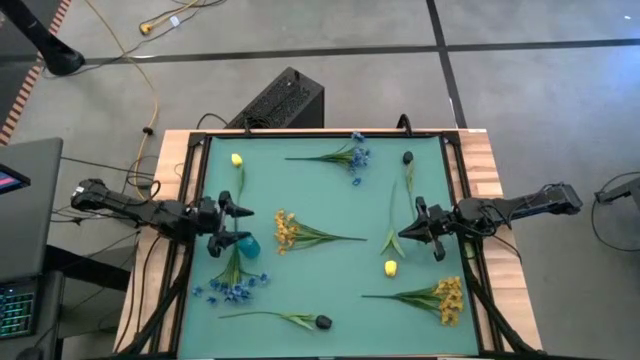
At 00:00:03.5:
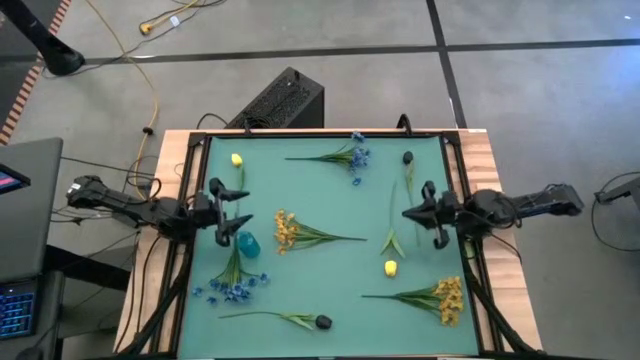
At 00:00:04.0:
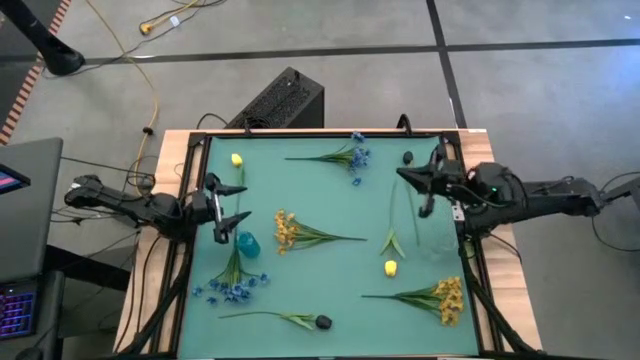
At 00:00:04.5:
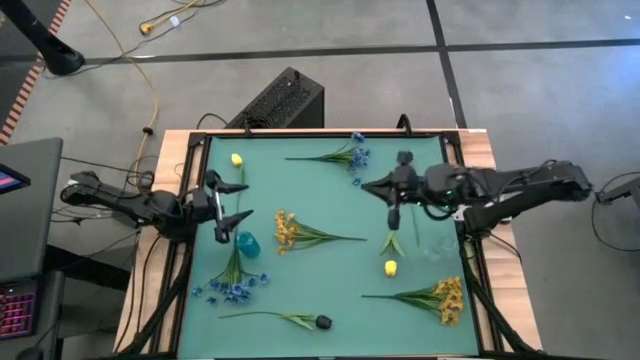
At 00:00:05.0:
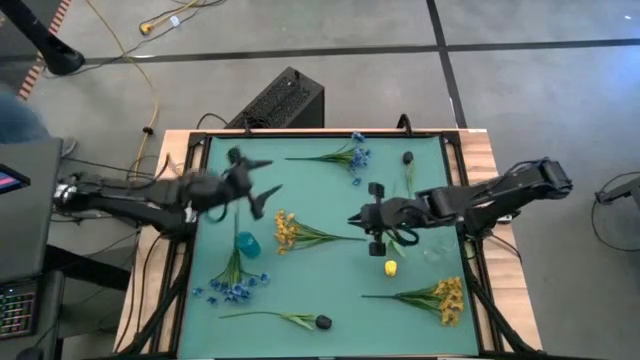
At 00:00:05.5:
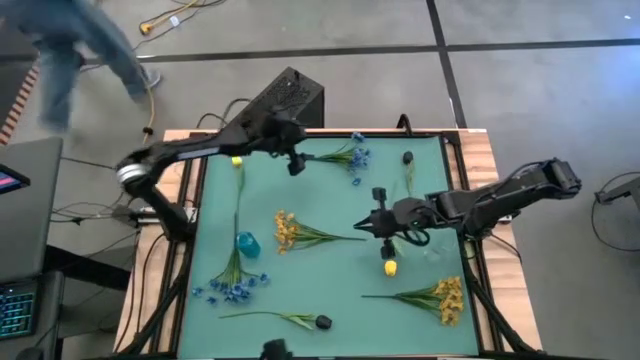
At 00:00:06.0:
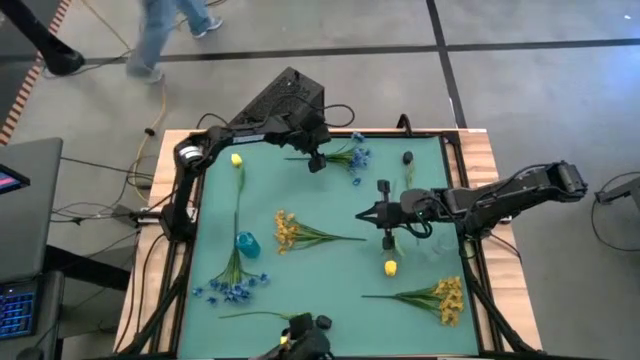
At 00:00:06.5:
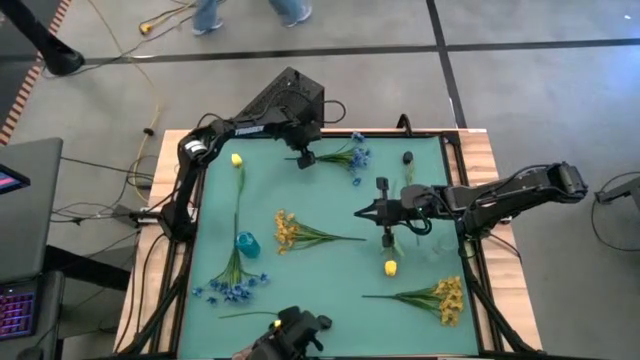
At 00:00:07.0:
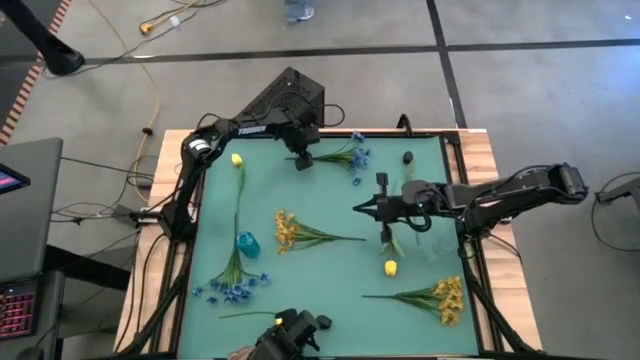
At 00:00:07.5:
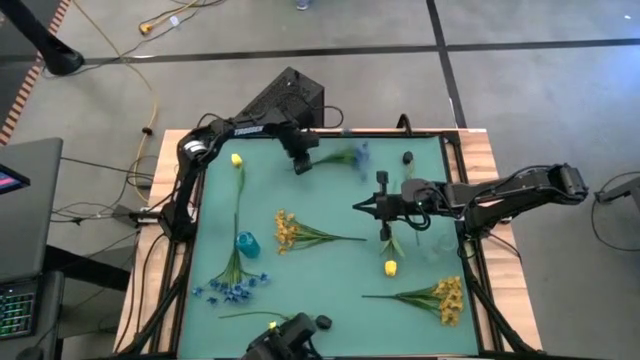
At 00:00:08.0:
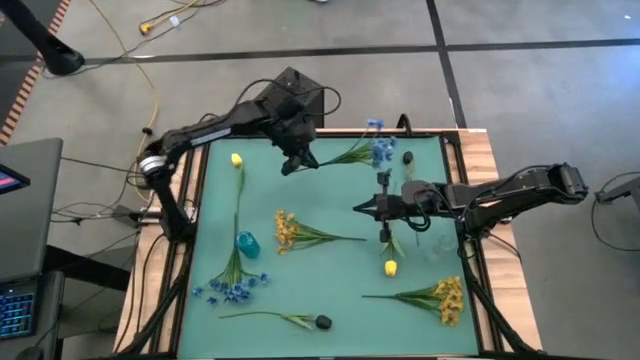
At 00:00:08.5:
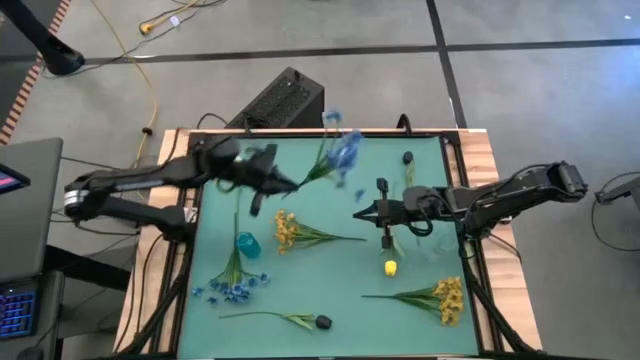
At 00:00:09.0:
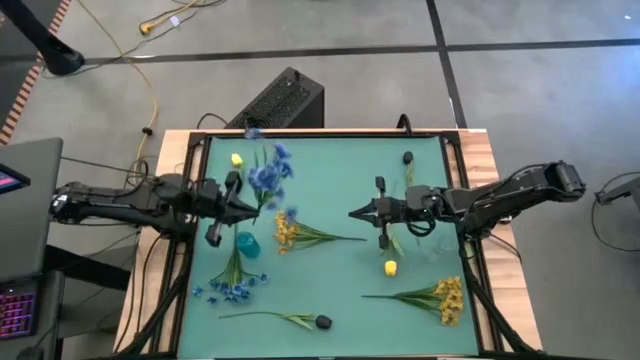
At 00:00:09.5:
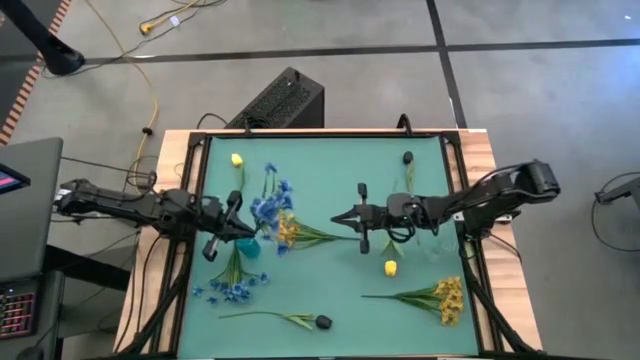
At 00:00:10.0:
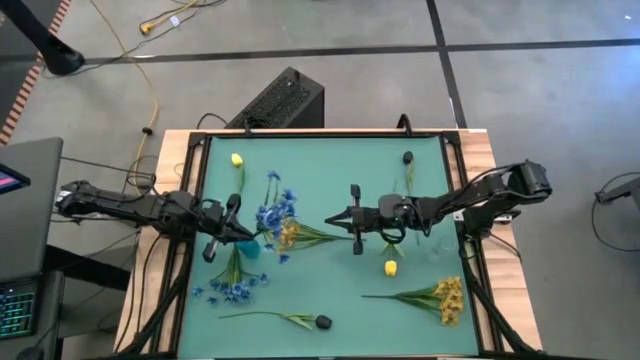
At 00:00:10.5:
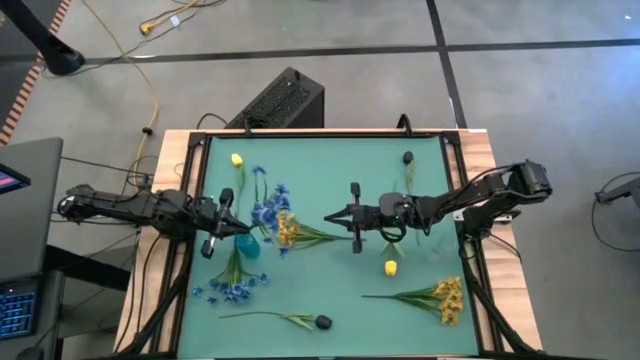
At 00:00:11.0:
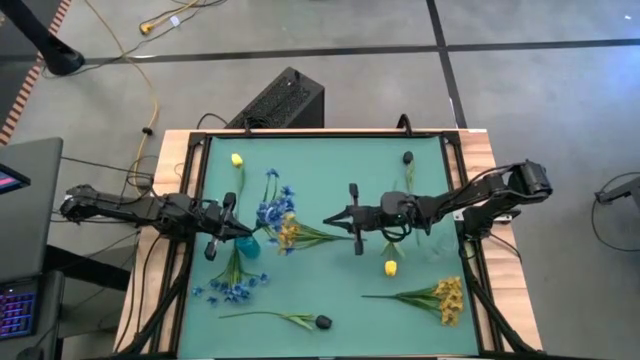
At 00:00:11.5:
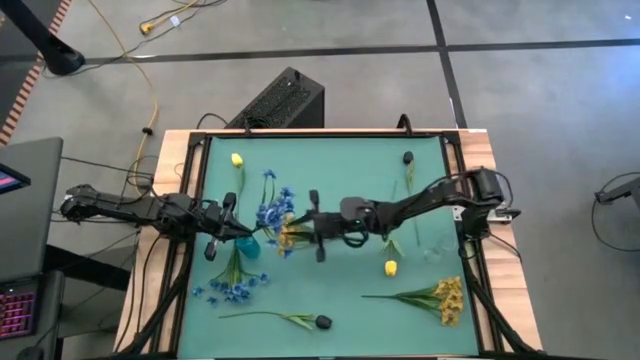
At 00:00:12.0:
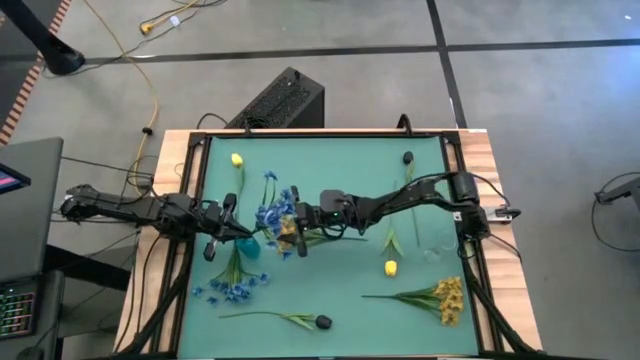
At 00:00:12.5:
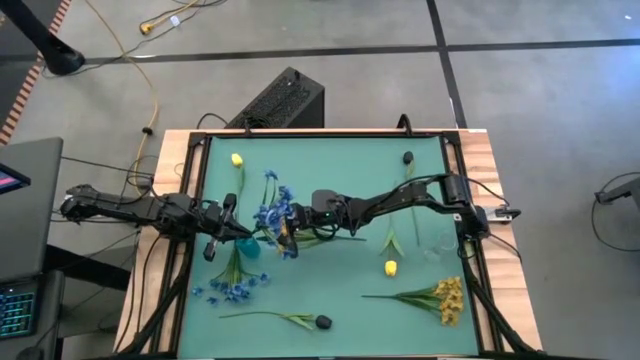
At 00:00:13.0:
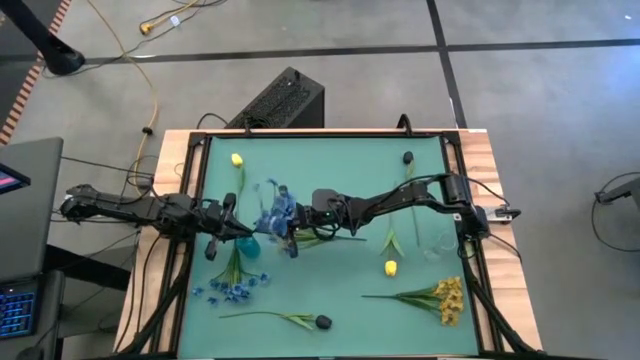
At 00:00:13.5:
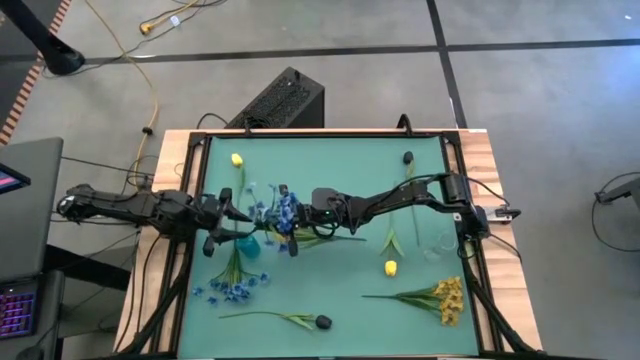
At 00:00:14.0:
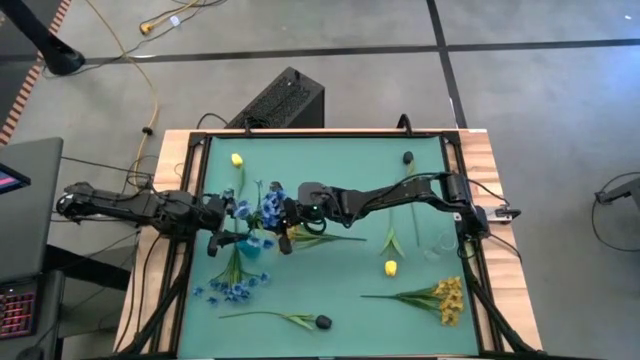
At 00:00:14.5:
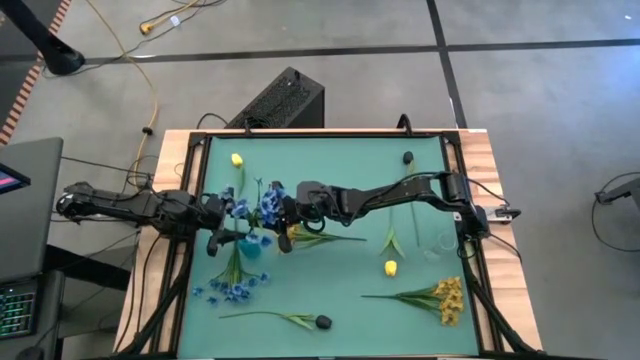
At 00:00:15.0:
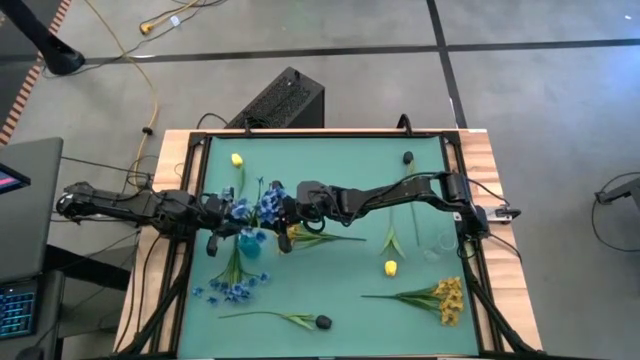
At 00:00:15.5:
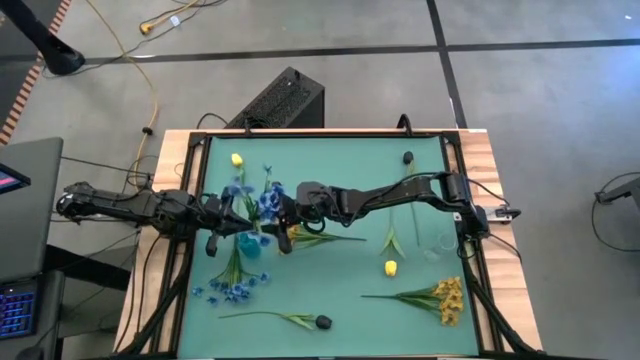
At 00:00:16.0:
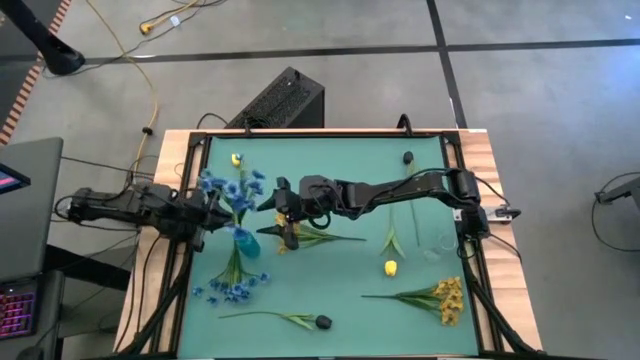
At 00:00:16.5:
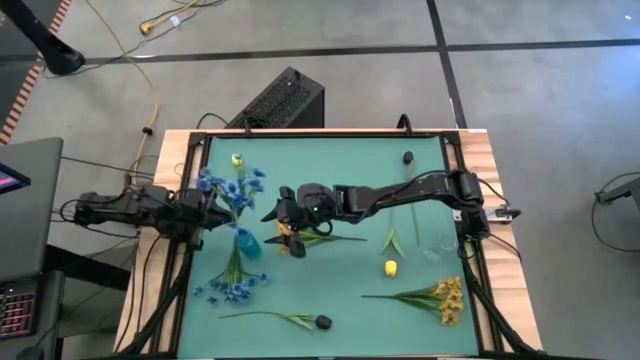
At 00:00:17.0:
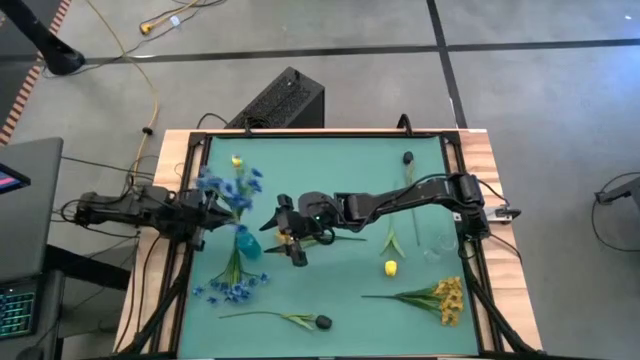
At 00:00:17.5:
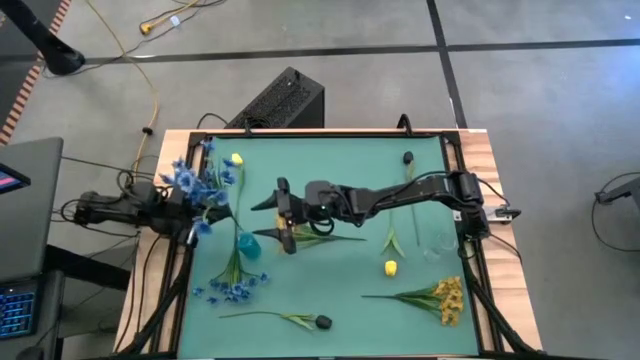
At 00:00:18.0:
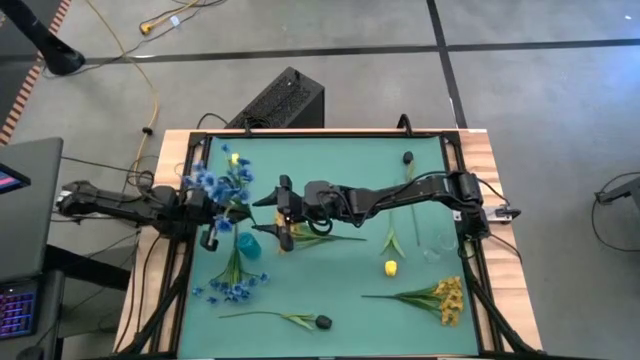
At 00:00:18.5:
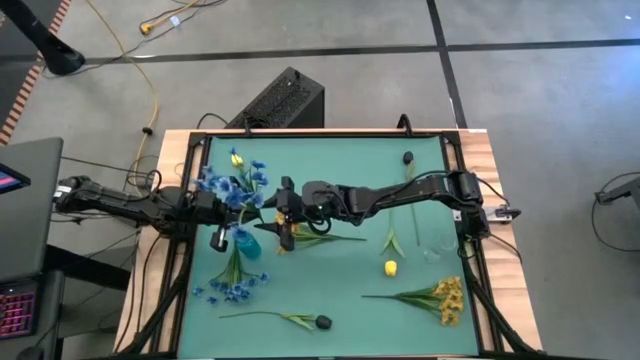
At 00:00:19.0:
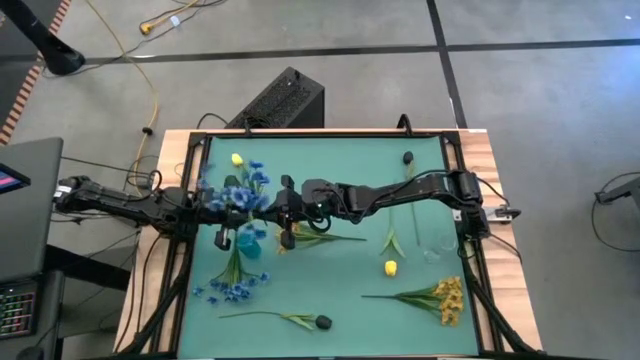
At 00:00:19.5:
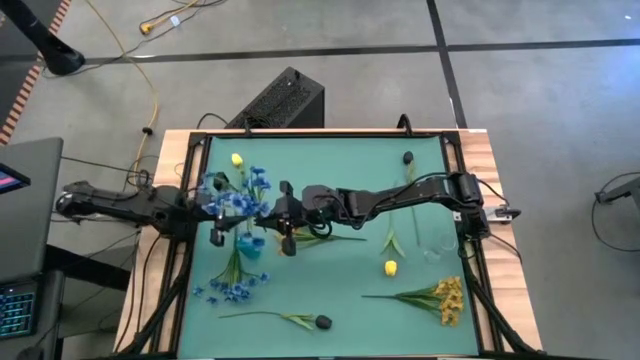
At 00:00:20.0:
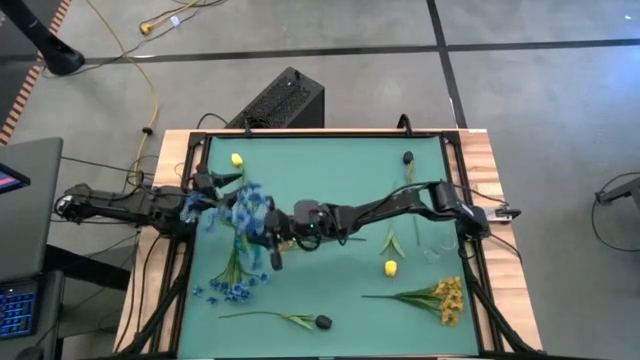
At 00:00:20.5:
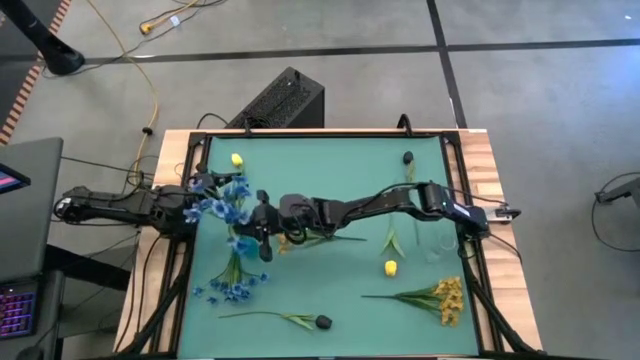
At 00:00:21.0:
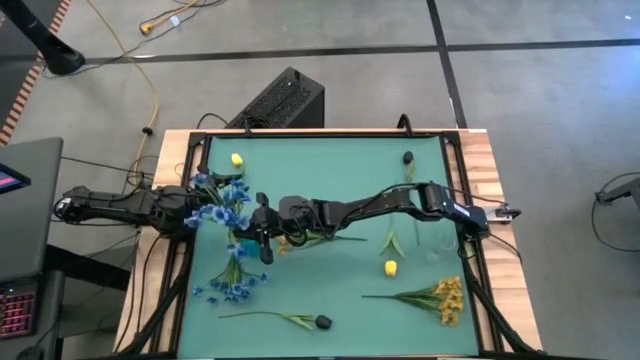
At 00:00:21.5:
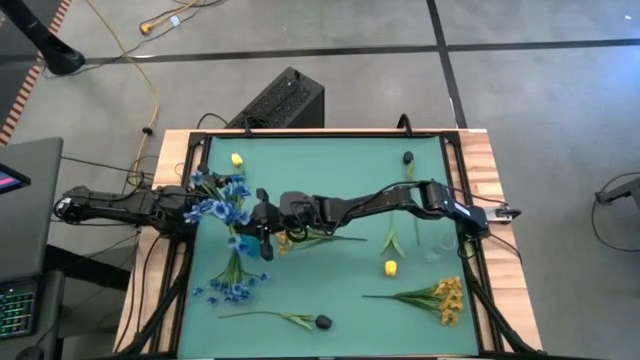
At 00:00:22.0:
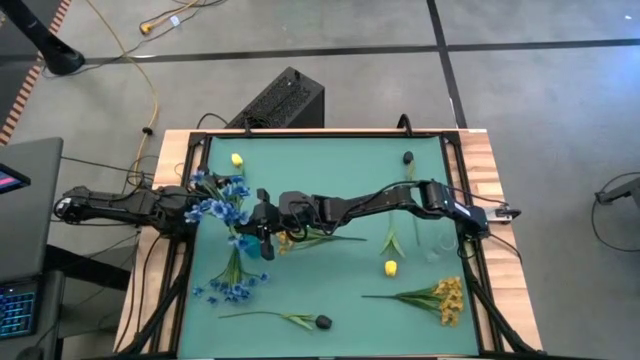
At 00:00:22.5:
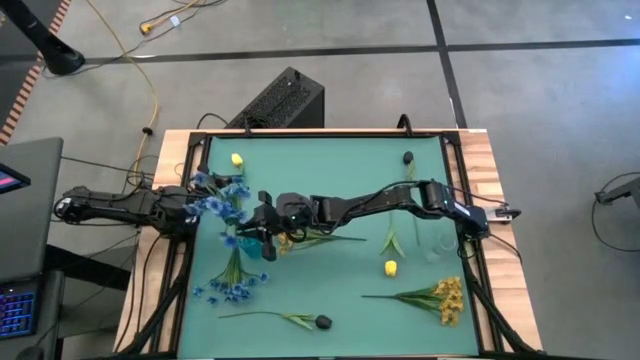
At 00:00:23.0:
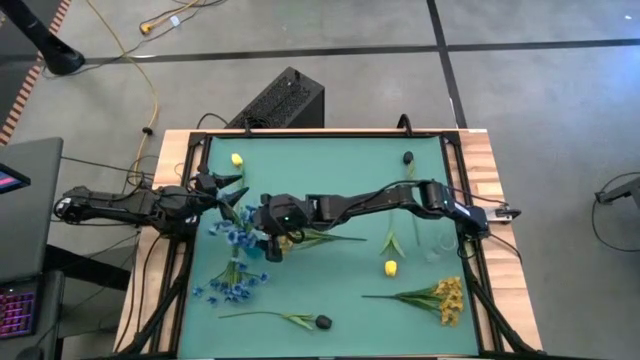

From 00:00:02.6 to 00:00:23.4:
Task: Sort flowers into vase by color
Put the top blue flowers into the blue vase
